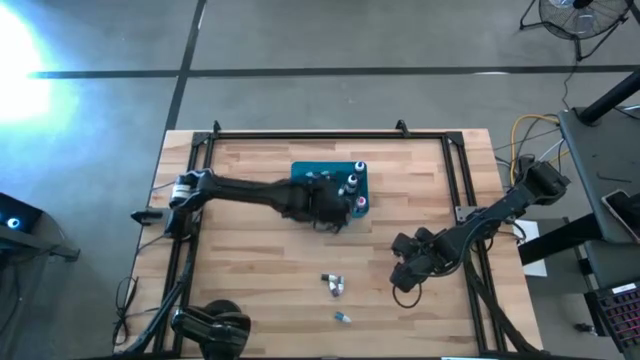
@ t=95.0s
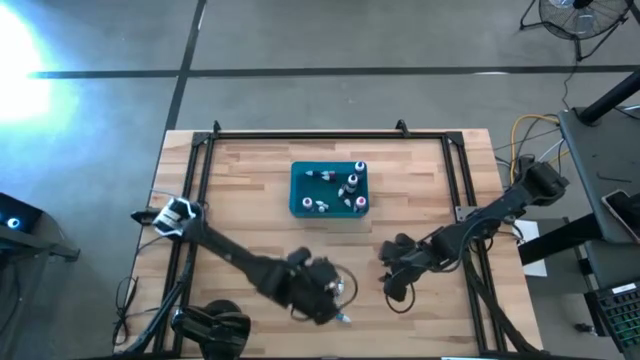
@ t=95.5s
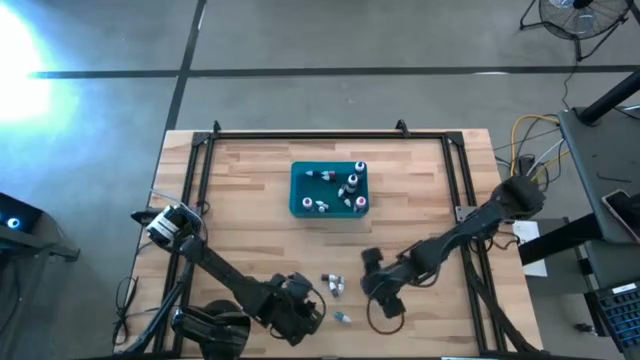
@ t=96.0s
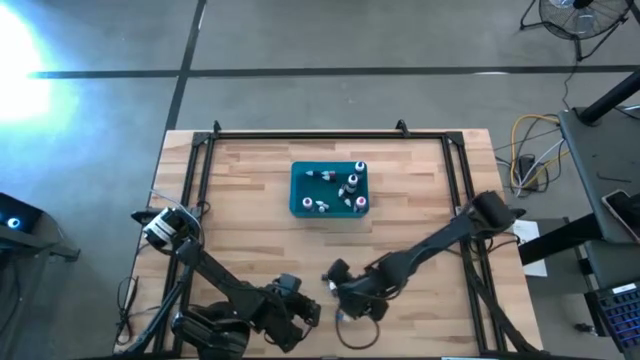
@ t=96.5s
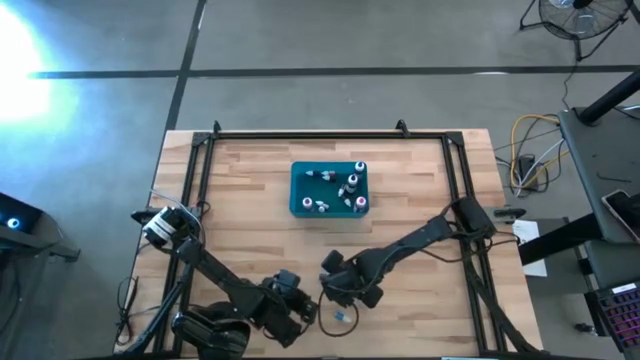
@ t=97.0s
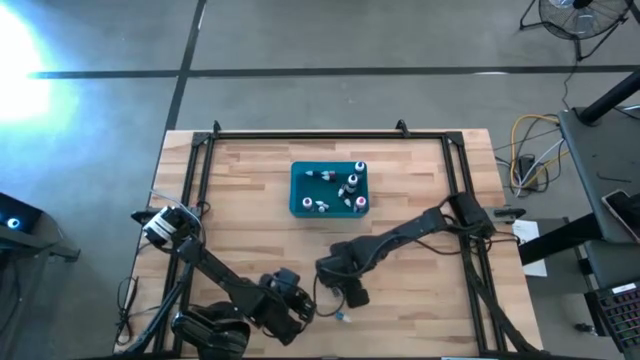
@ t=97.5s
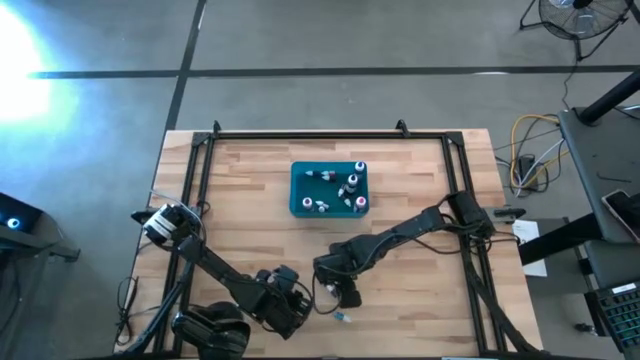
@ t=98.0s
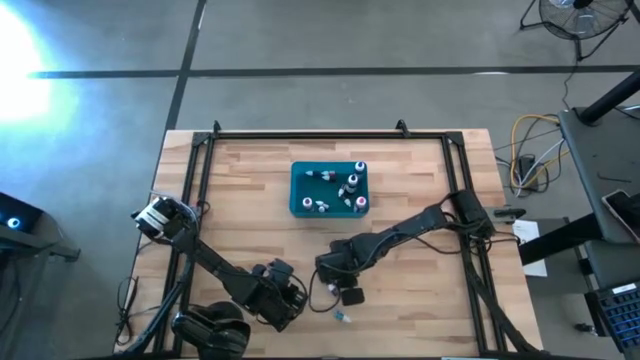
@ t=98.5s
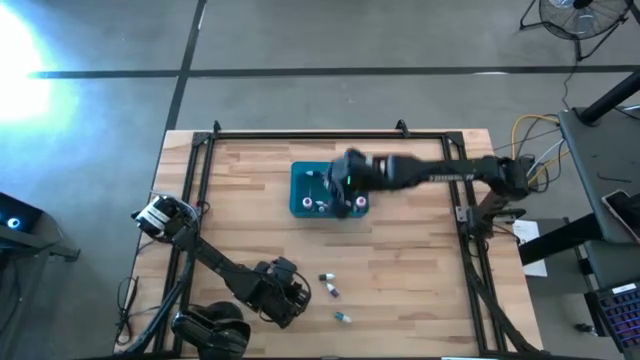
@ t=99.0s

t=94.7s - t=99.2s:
Task: Pick & Place food coloring
Put the green food coloring bottle in the blue bin

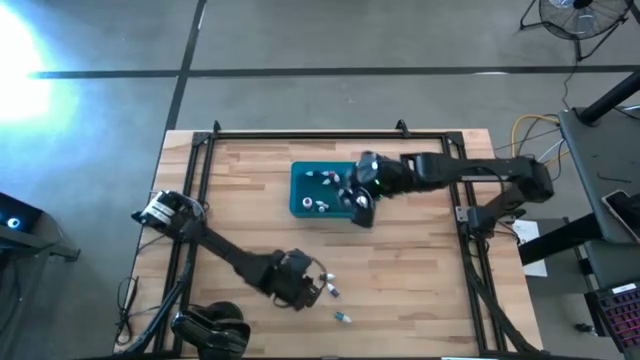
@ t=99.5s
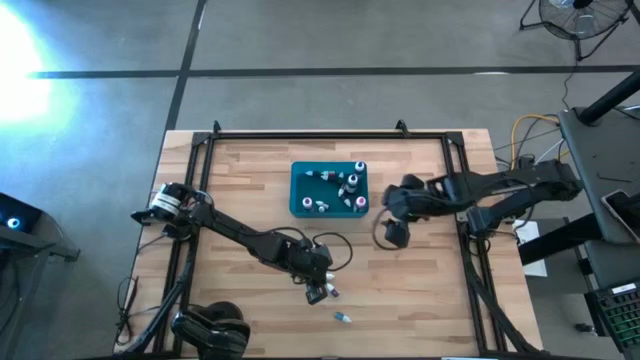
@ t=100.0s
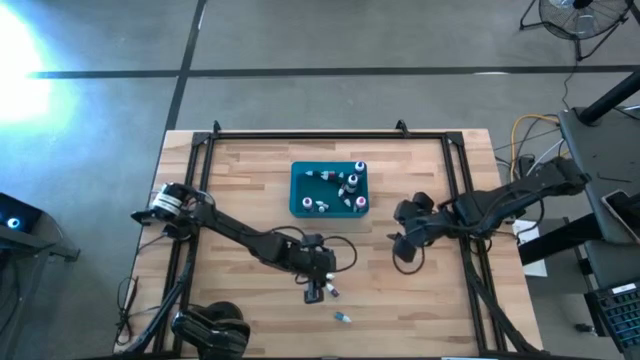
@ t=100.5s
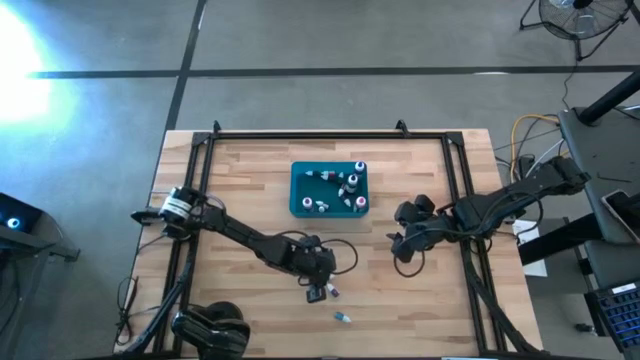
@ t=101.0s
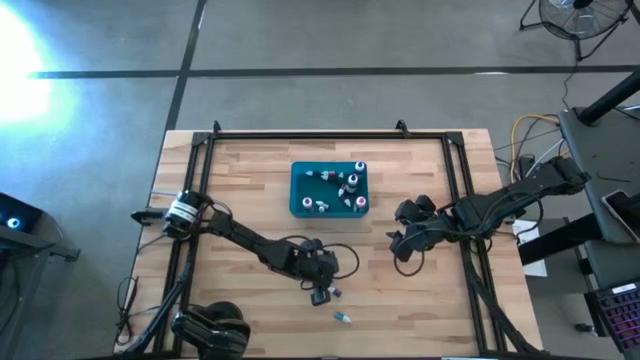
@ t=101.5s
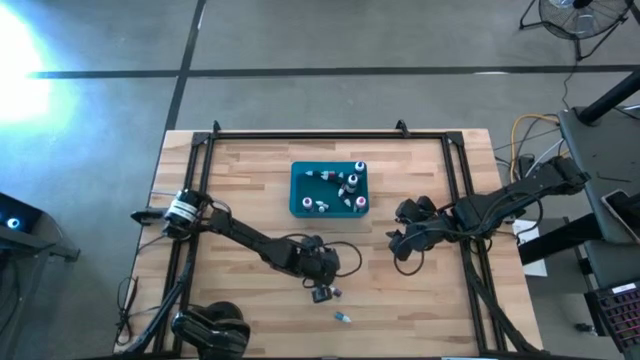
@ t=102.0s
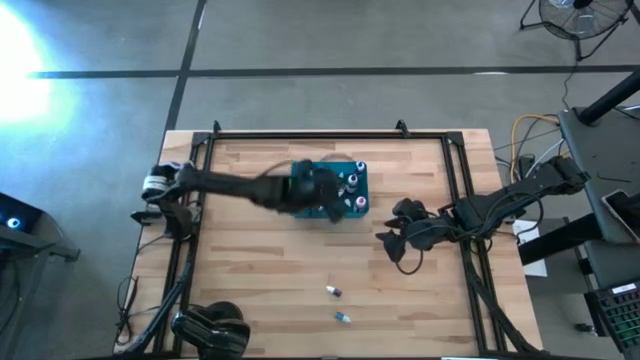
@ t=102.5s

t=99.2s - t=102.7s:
Put the blue food coloring bottle into the blue bin

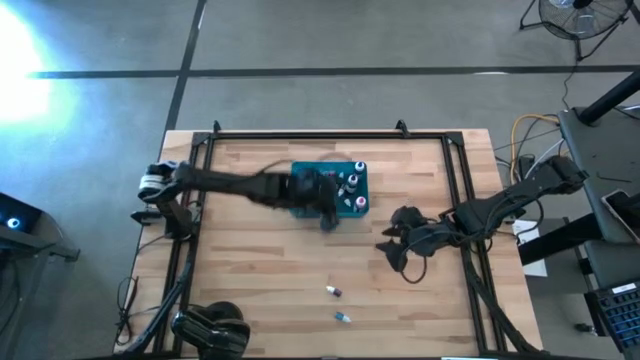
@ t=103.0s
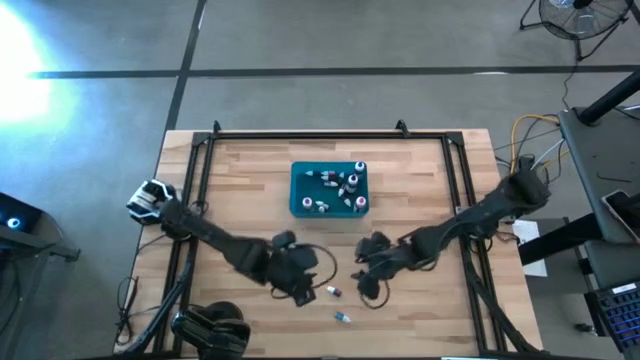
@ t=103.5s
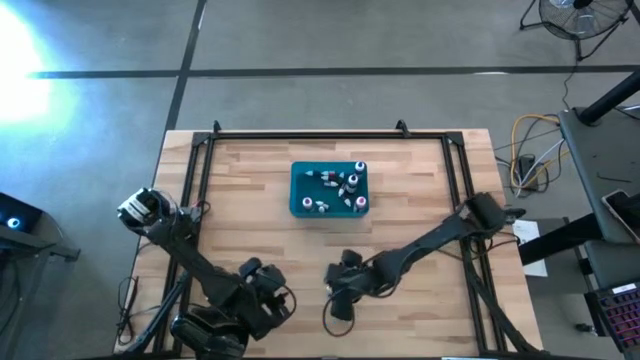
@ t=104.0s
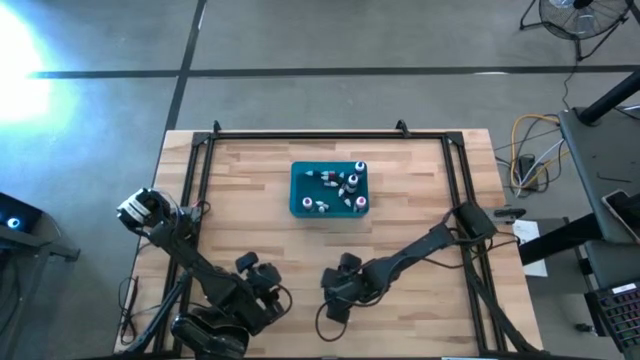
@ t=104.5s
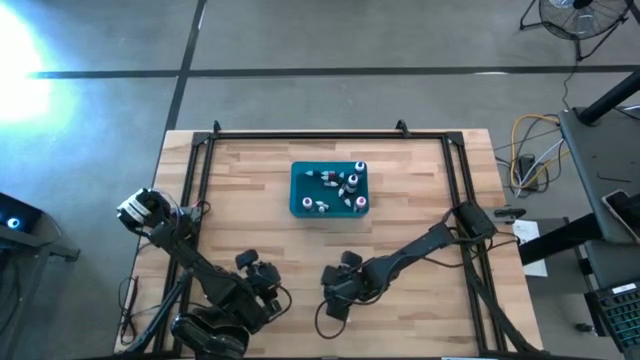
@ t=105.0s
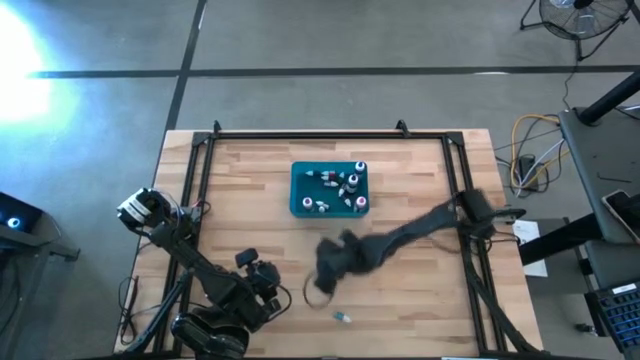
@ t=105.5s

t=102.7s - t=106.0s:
Put the violet food coloring bottle into the blue bin

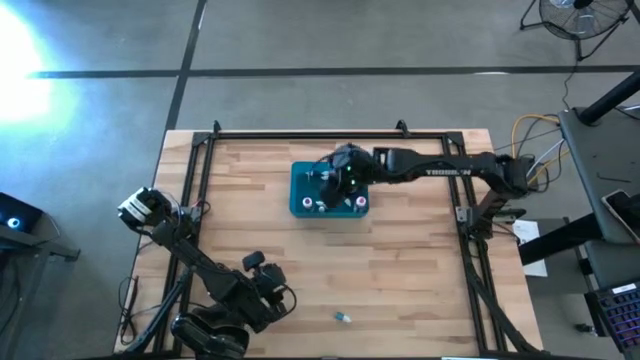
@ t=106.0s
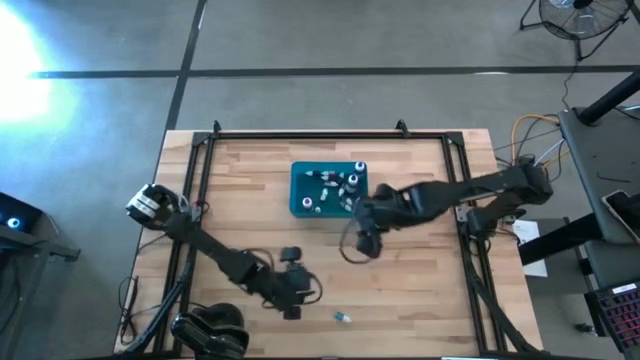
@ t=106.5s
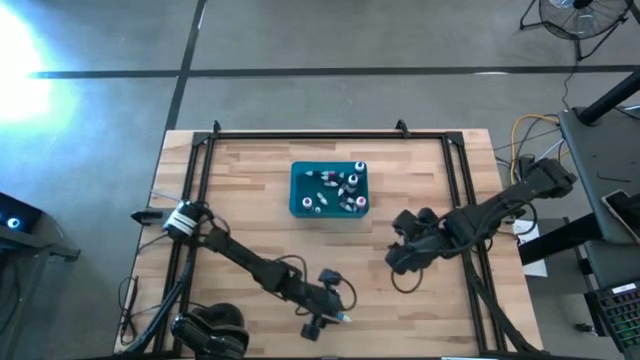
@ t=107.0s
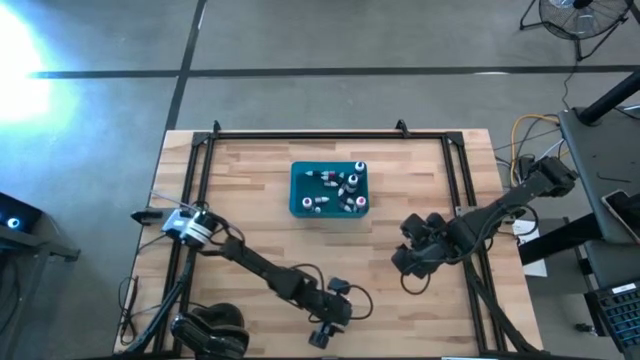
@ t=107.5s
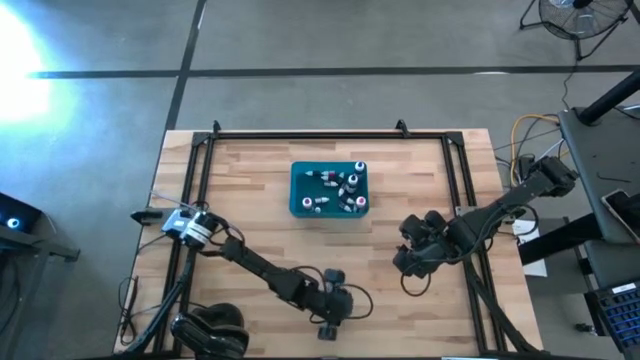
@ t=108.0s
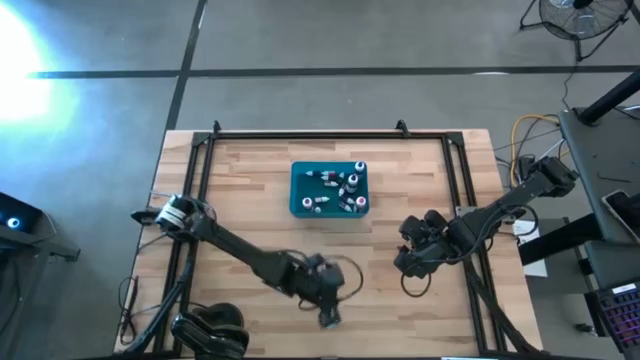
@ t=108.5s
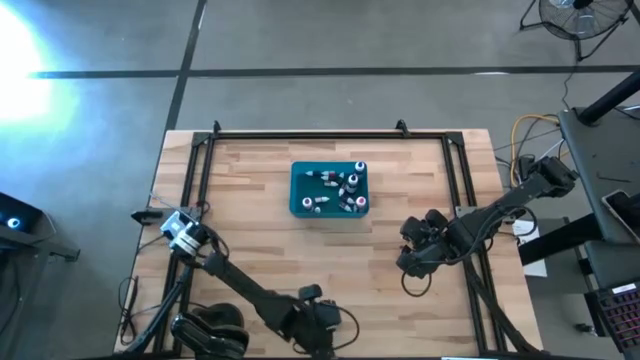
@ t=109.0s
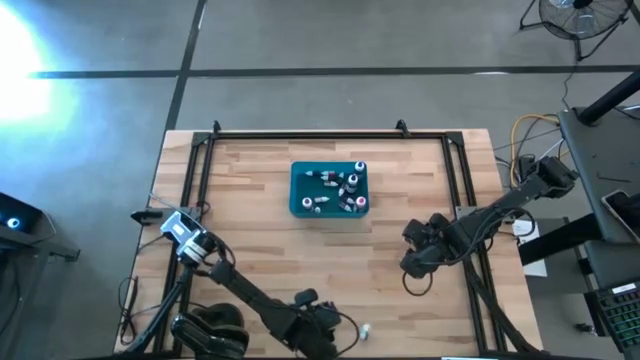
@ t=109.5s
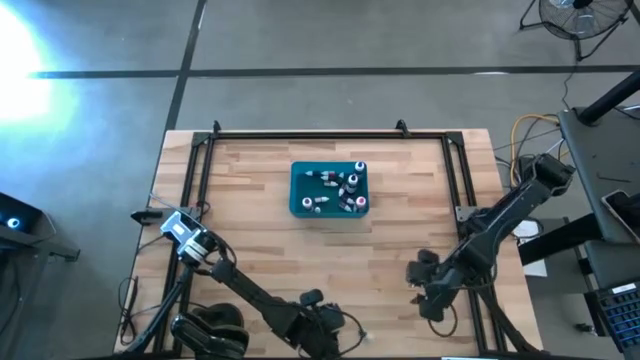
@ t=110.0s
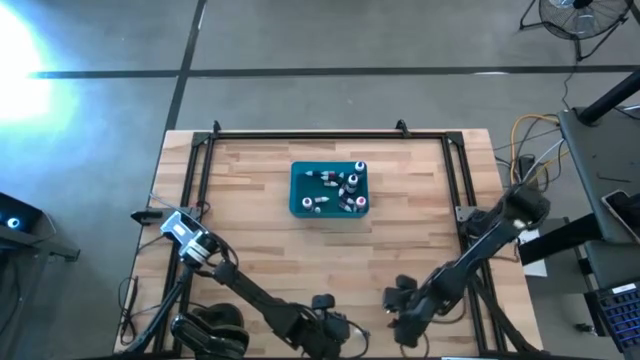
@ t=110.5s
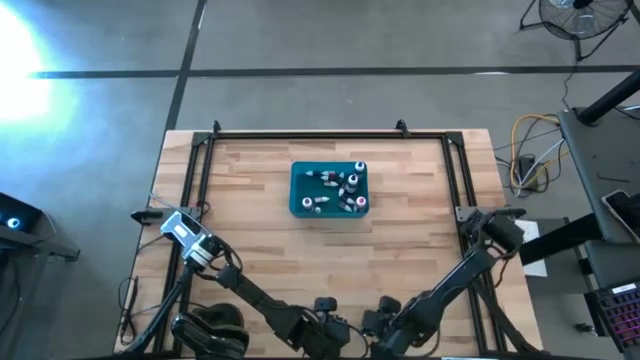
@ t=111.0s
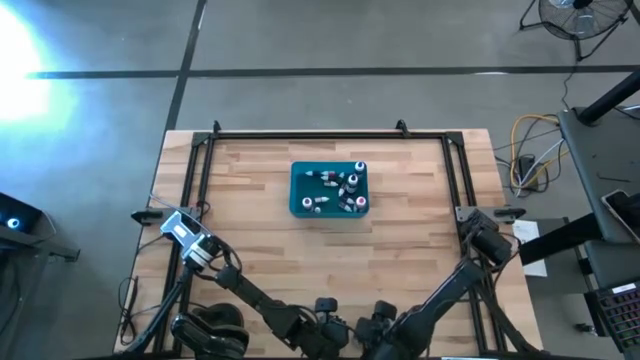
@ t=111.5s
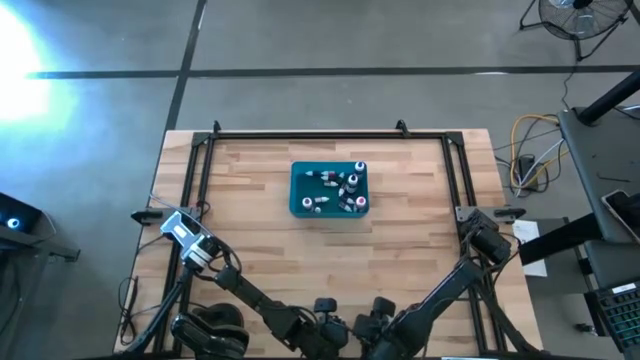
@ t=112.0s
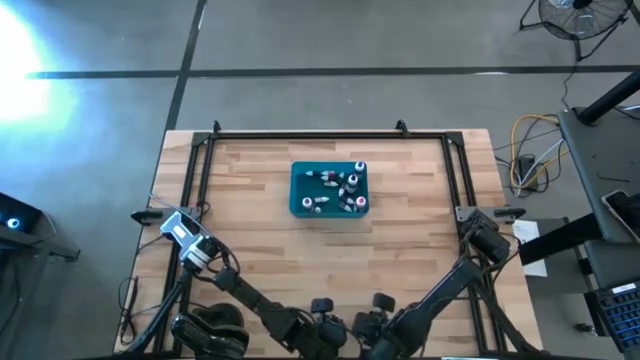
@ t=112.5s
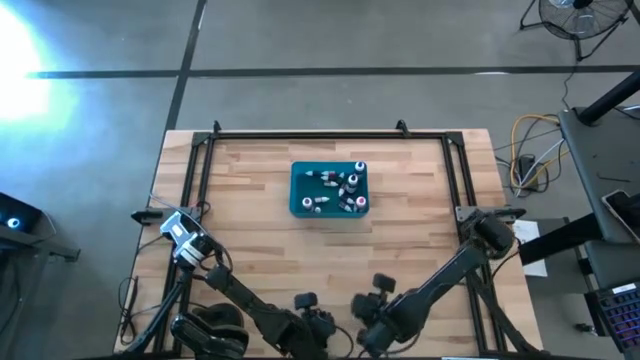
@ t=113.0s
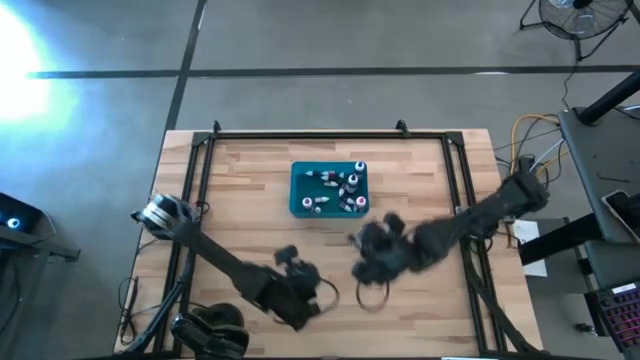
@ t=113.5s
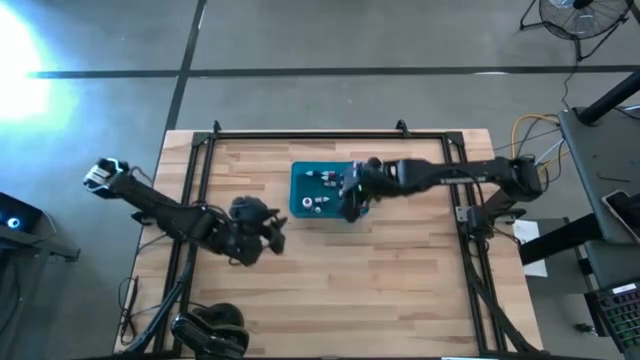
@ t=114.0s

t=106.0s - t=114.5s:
Put the small blue food coloring bottle in the blue bin
